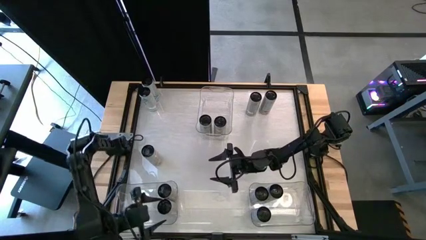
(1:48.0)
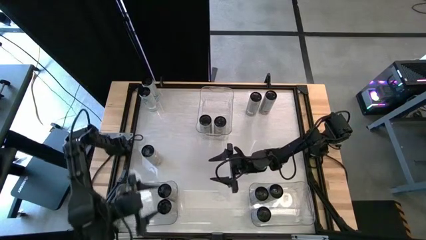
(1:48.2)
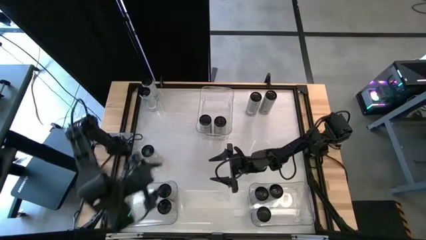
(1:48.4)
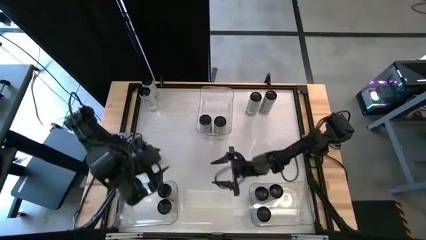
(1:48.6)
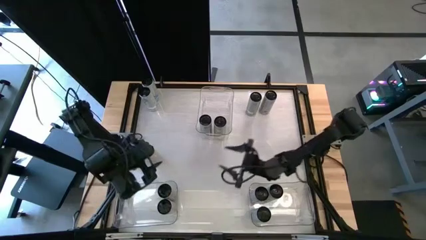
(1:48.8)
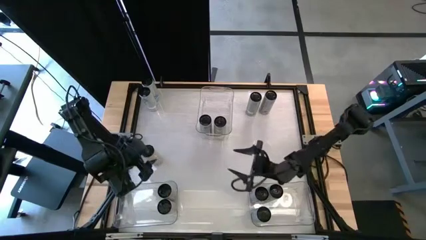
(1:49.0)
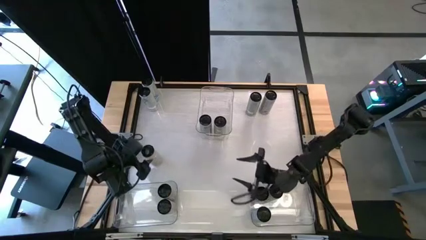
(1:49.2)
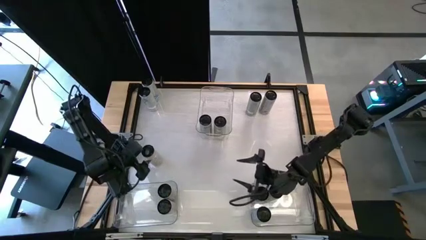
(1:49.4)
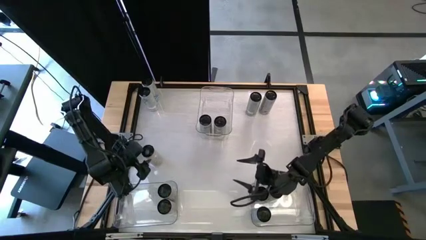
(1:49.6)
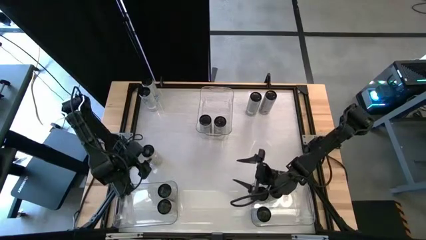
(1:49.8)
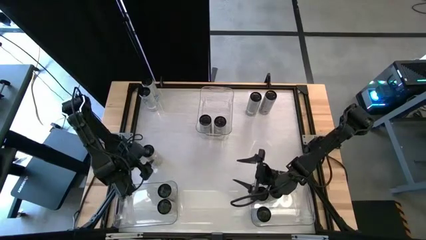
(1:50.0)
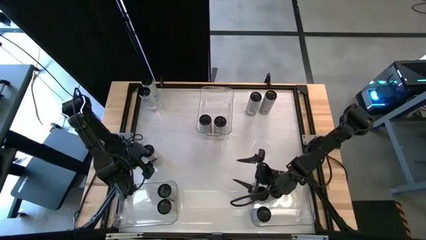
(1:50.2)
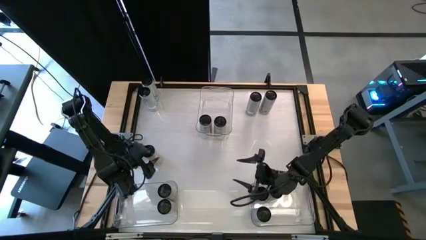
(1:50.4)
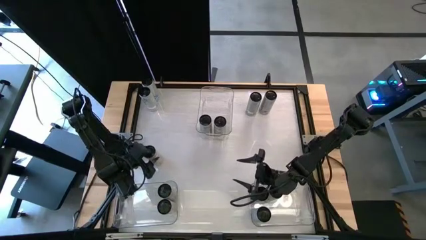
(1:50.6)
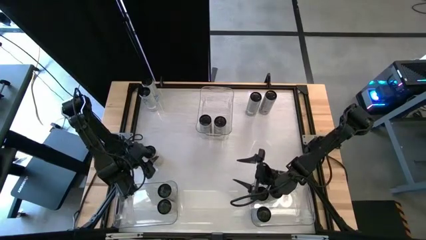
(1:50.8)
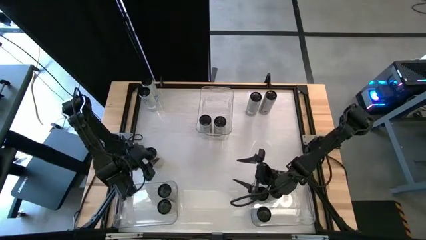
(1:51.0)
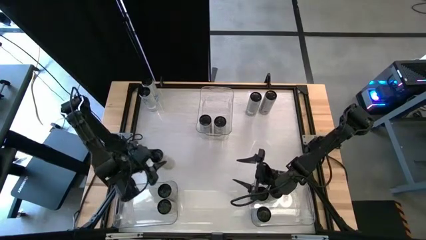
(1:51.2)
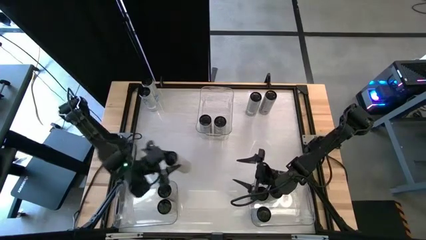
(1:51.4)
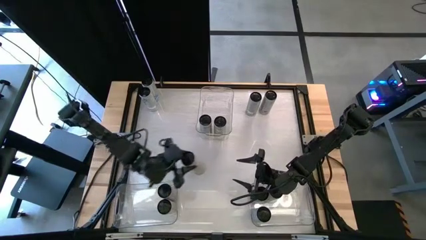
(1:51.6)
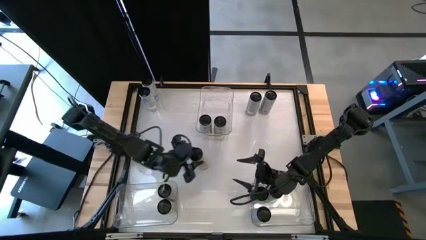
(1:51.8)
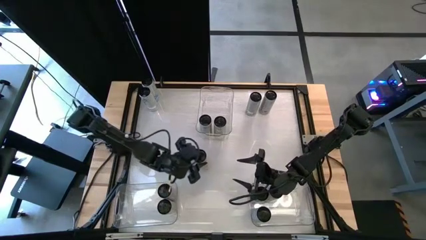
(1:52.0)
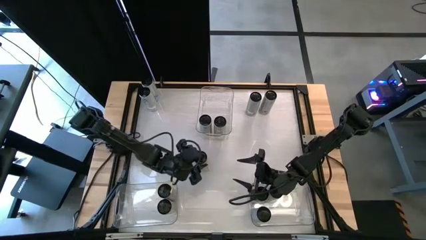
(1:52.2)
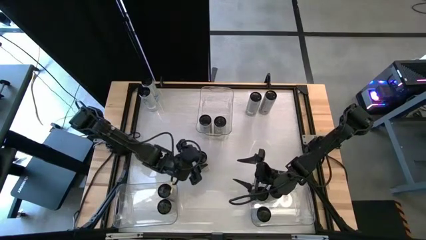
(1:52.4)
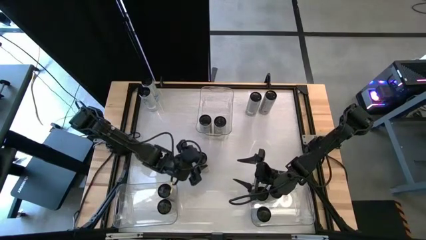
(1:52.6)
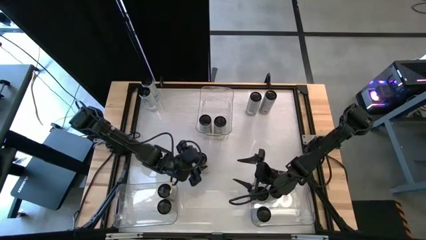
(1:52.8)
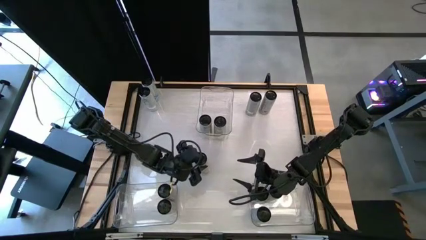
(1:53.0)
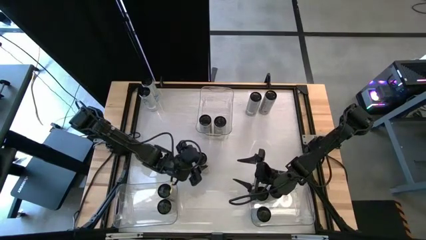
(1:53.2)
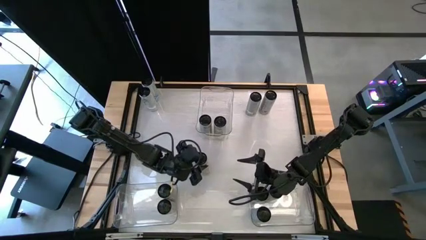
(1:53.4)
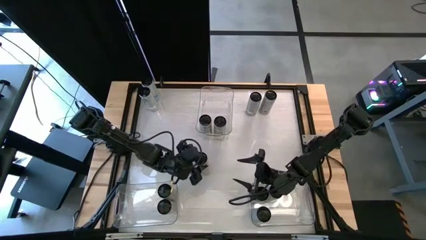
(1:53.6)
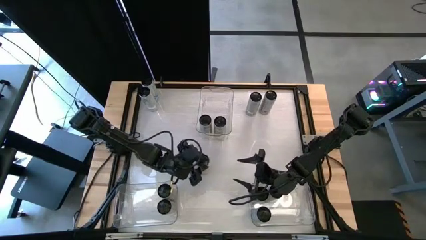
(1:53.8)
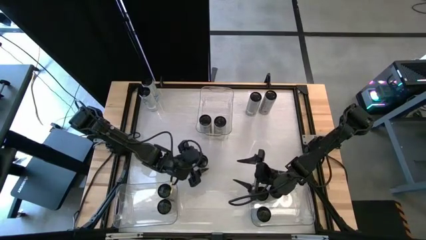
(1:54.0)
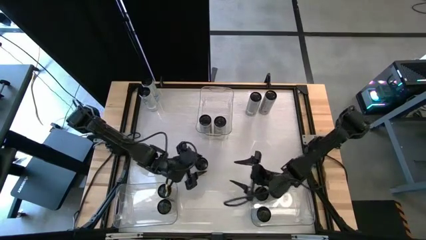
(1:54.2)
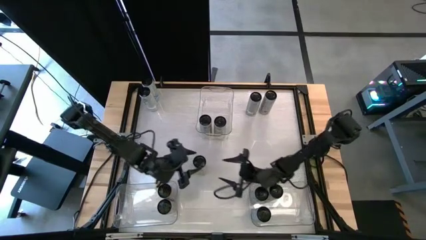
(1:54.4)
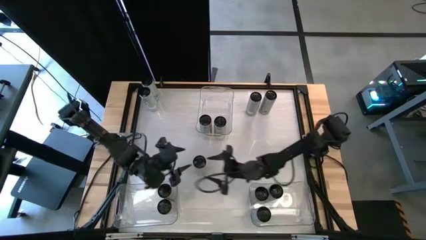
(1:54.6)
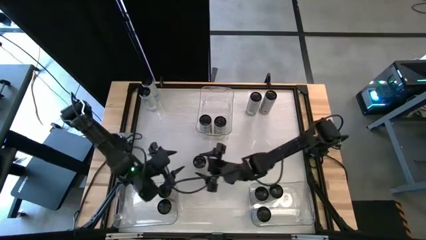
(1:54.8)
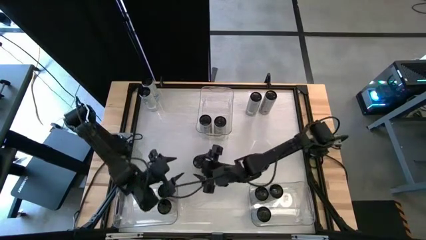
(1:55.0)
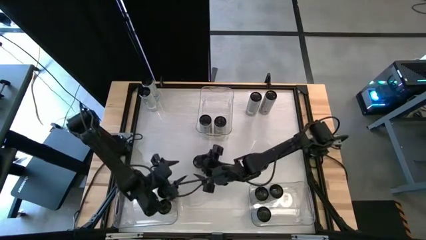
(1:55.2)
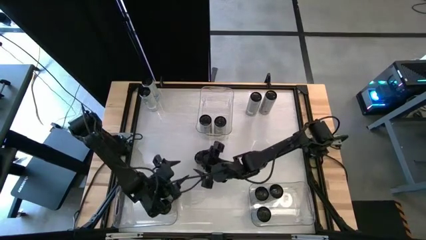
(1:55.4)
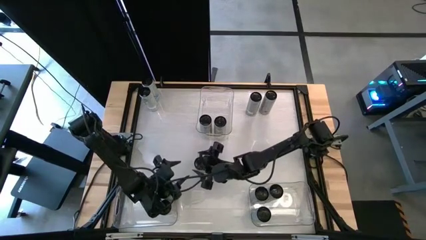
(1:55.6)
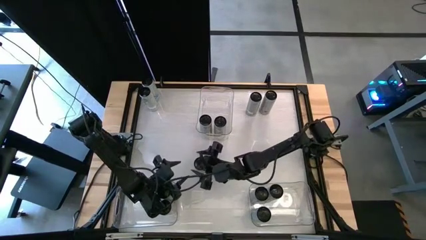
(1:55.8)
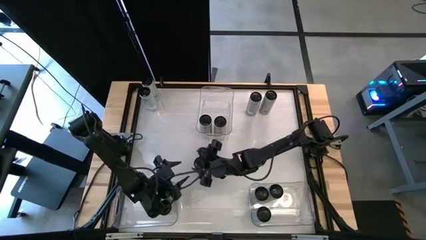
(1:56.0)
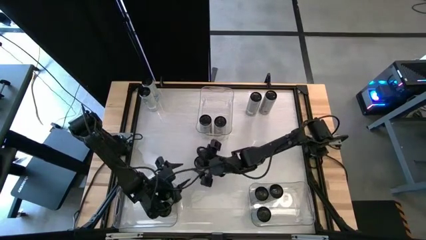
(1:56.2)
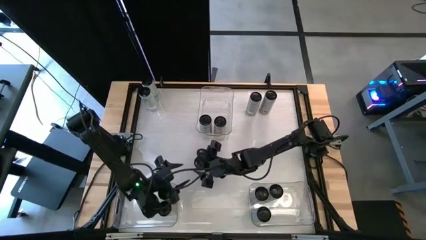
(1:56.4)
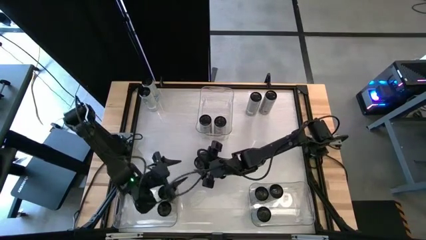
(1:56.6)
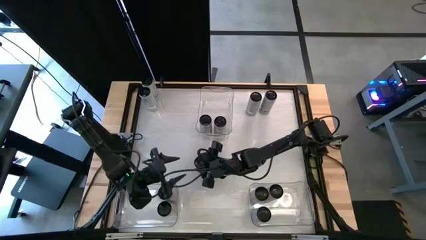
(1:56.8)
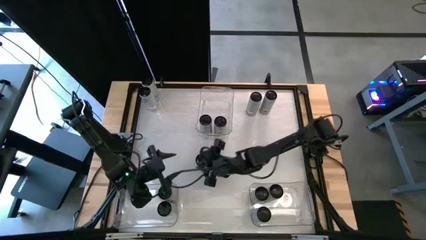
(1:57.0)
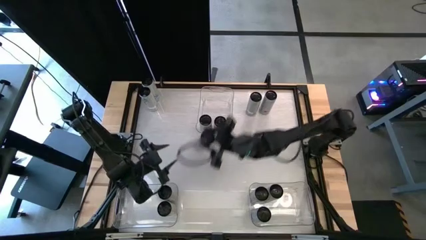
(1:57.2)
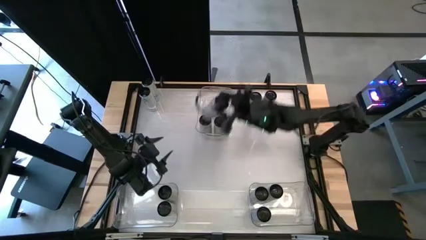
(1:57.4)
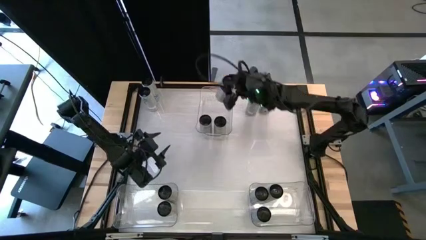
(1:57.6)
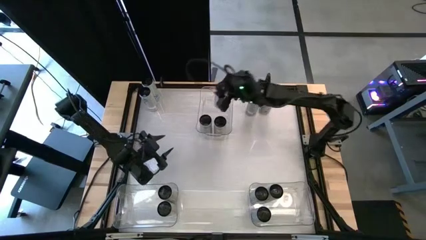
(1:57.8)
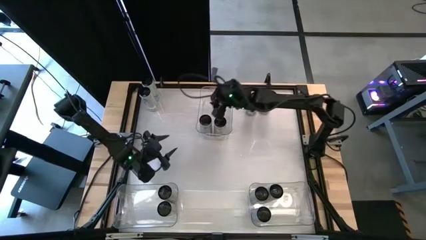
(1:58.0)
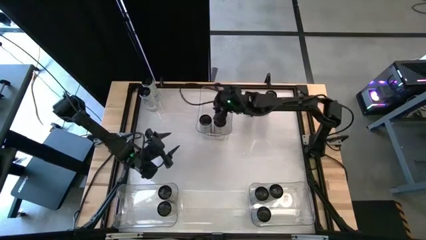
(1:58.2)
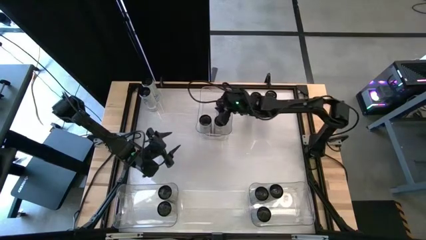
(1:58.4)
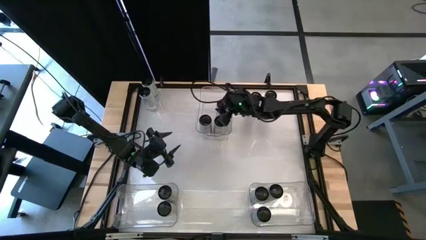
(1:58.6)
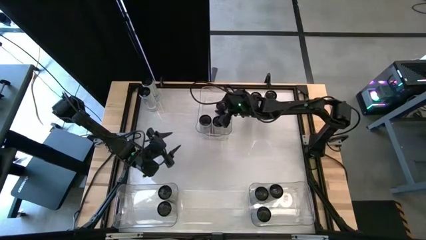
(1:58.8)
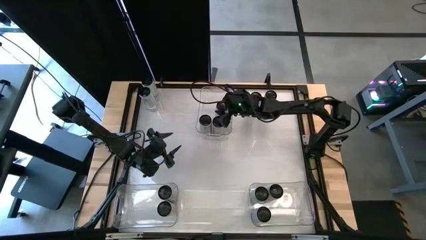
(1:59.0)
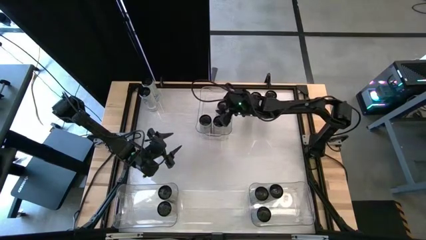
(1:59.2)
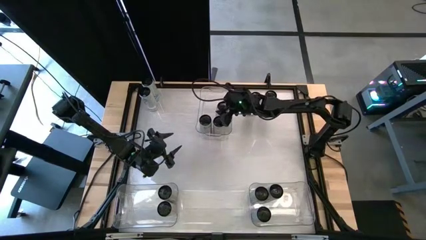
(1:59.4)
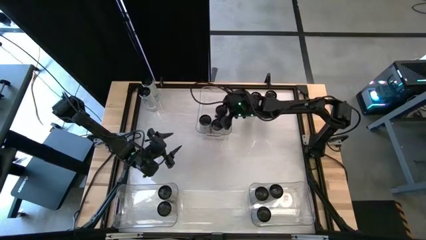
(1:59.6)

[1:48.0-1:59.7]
Task: Sort soda cans
Put the white yellow soda can into the top middle transparent bin
